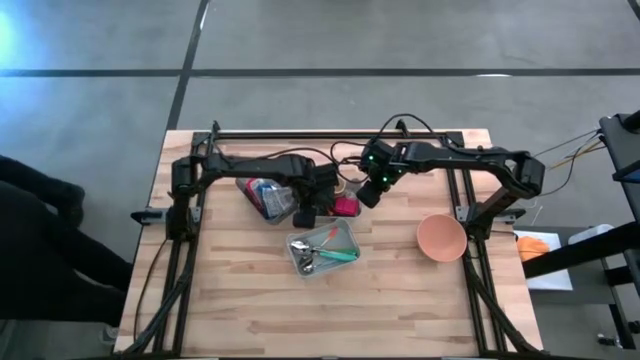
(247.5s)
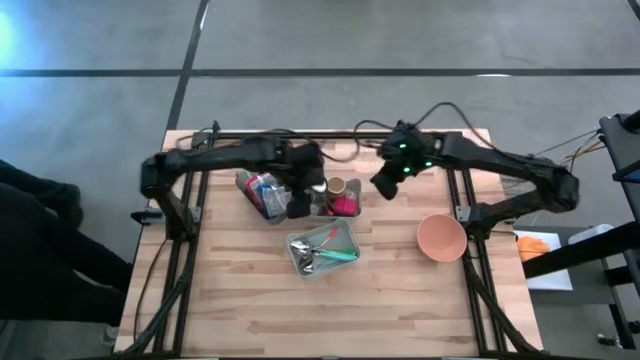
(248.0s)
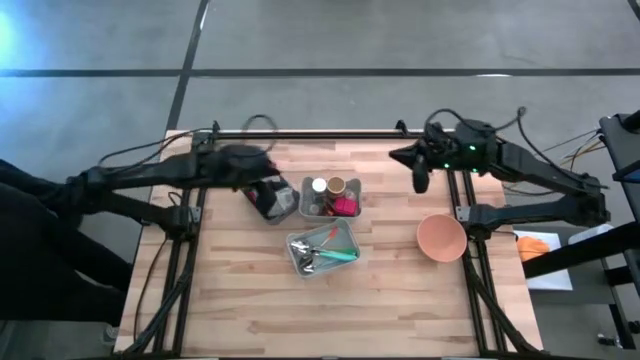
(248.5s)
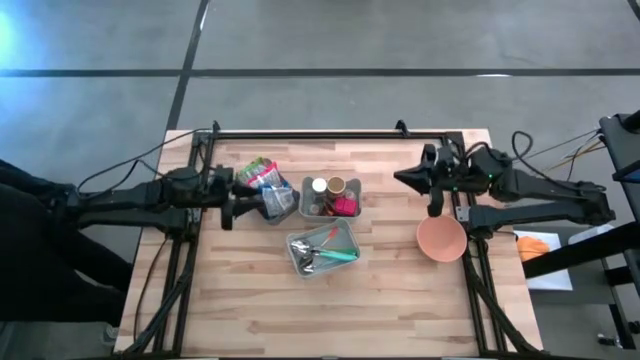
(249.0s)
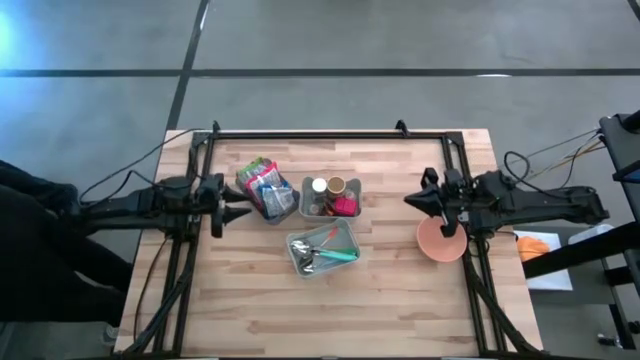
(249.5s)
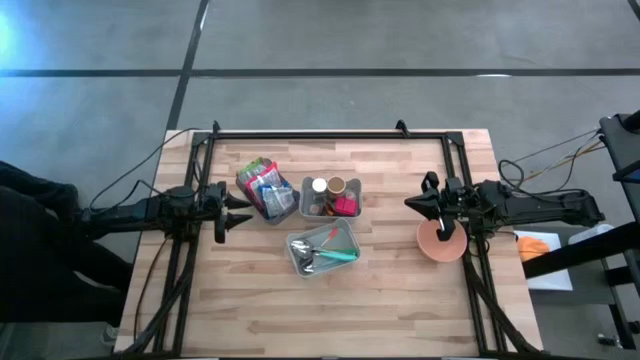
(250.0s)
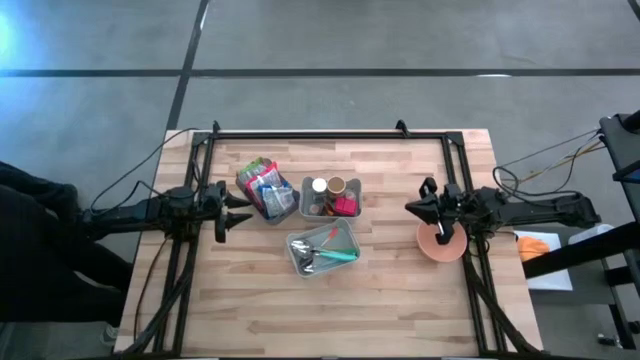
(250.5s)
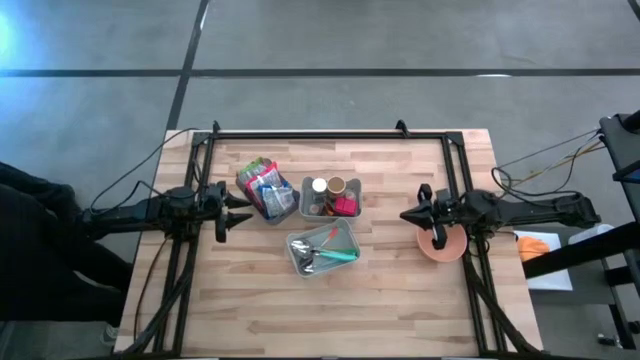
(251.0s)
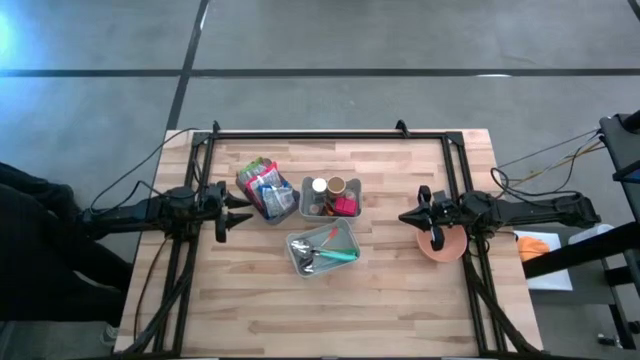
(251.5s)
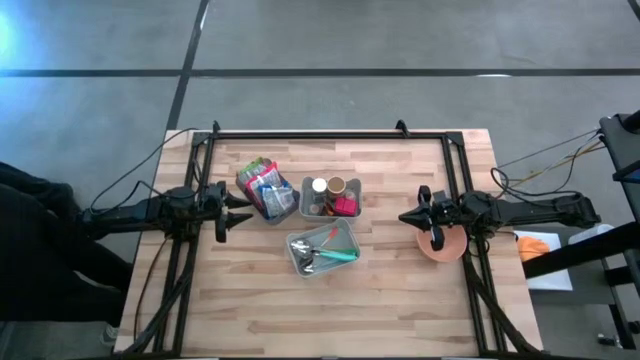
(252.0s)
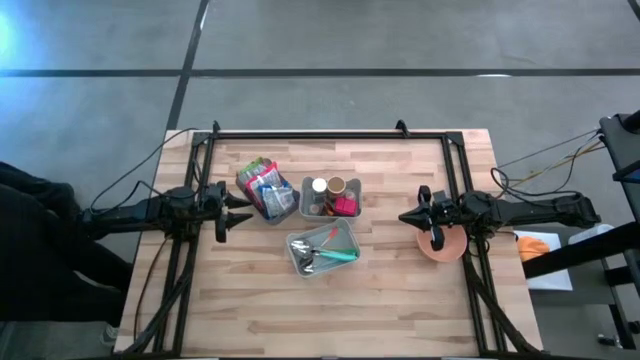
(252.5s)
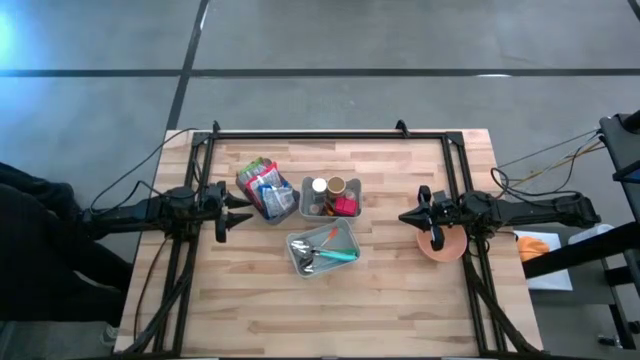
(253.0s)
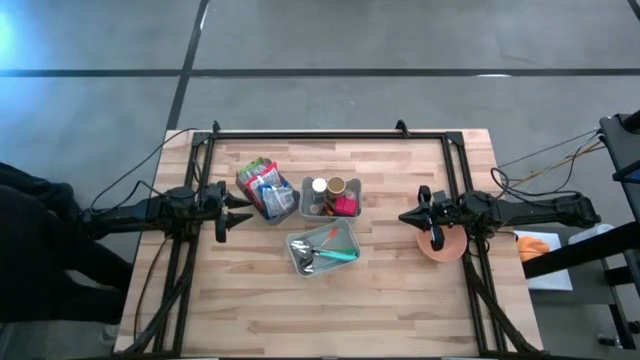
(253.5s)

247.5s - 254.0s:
Return to Home Position

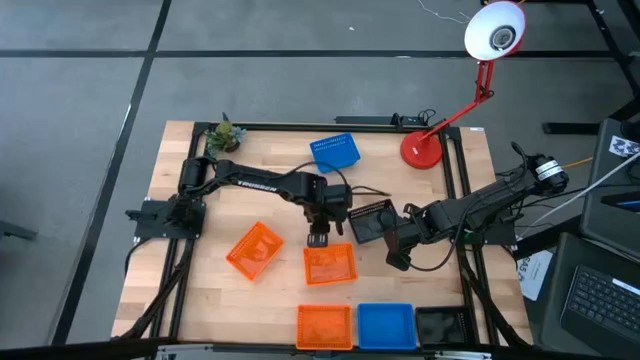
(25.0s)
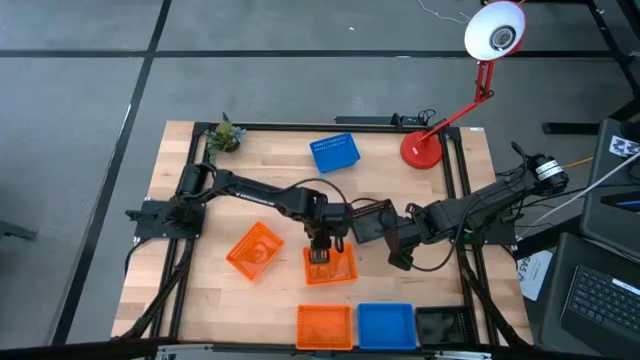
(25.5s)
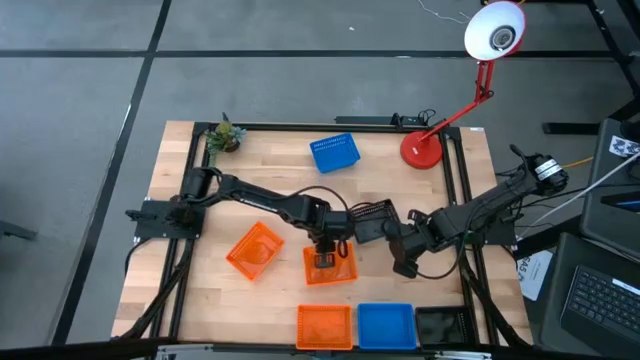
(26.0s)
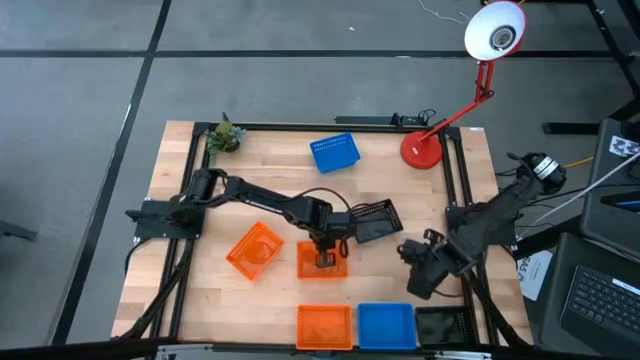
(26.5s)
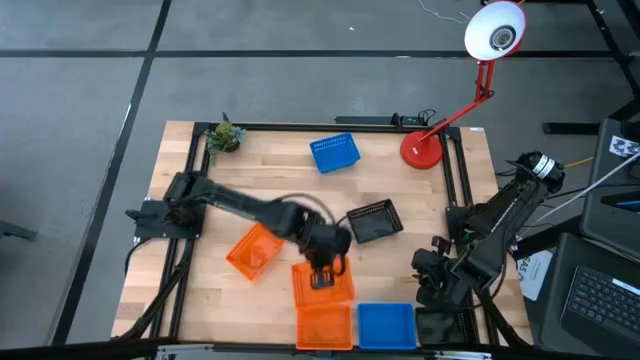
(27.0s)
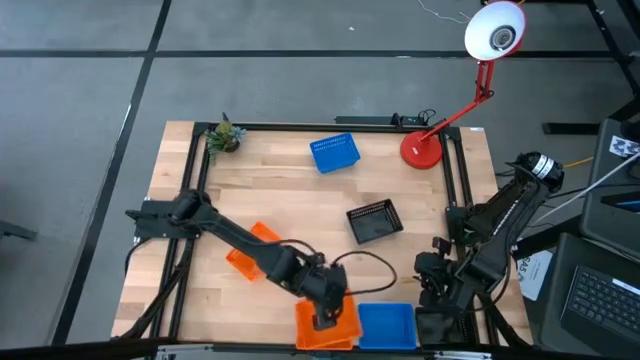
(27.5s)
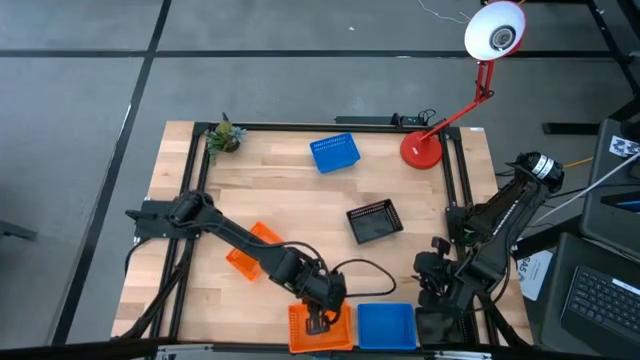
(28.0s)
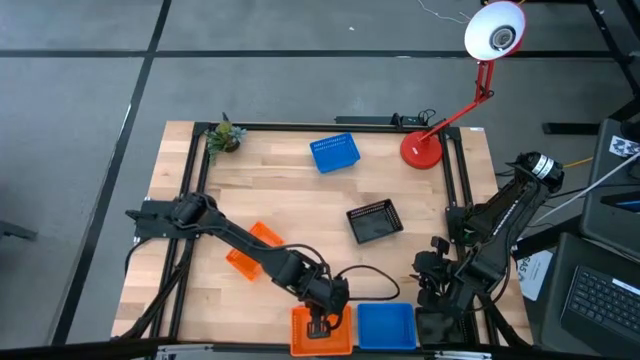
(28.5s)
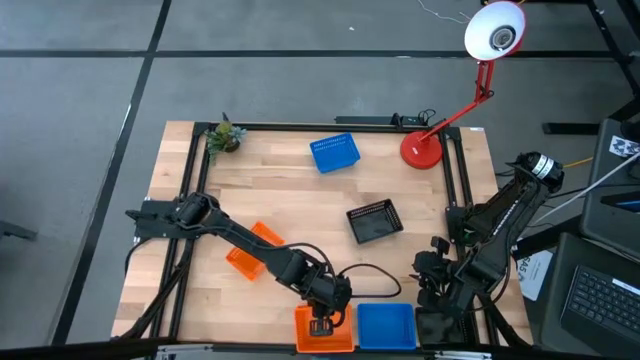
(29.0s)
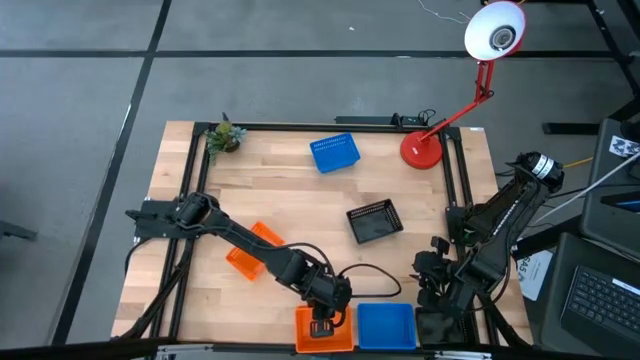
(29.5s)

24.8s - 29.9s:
Stack the top right orange bin on the bottom orange bin

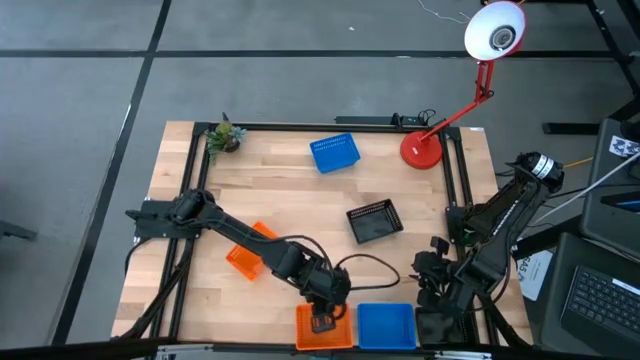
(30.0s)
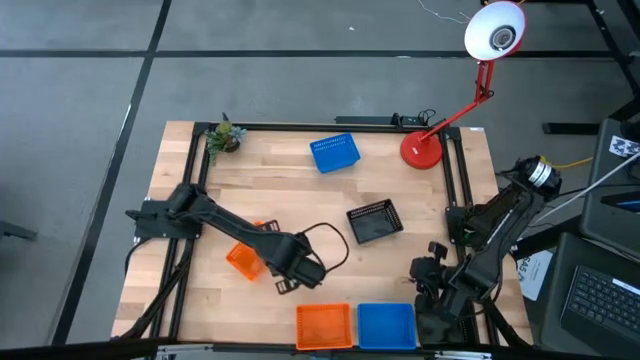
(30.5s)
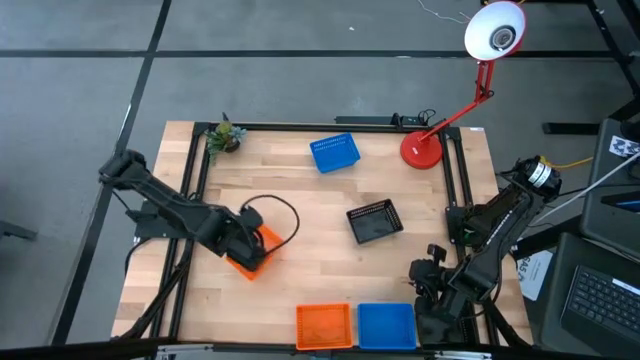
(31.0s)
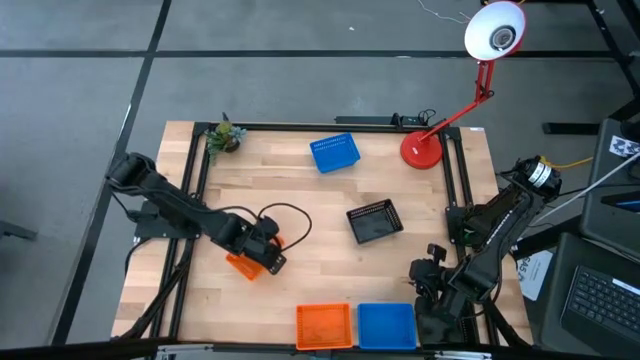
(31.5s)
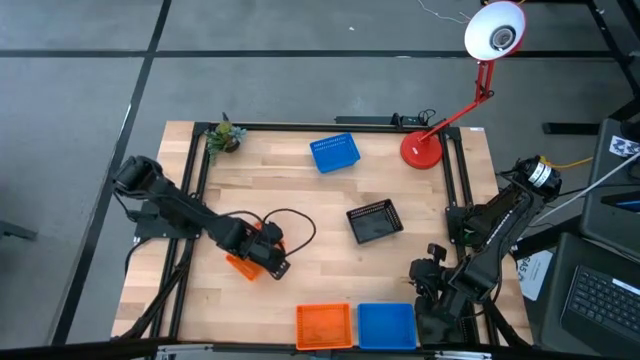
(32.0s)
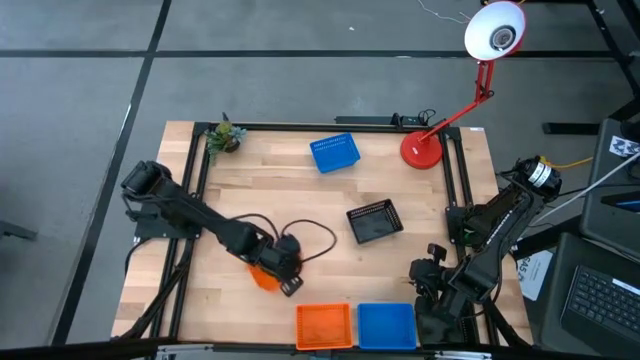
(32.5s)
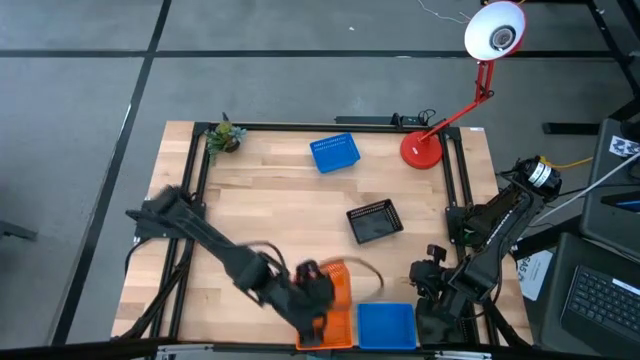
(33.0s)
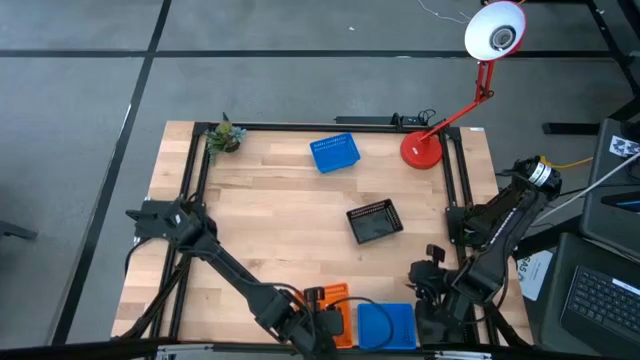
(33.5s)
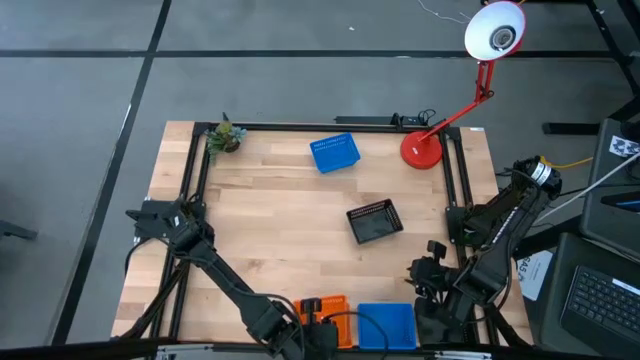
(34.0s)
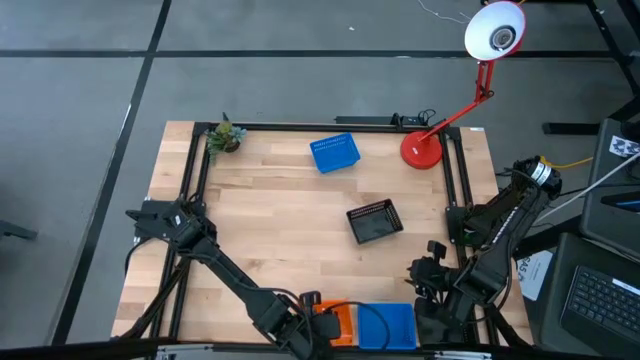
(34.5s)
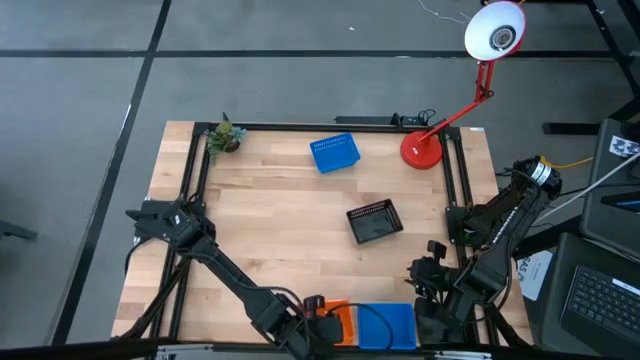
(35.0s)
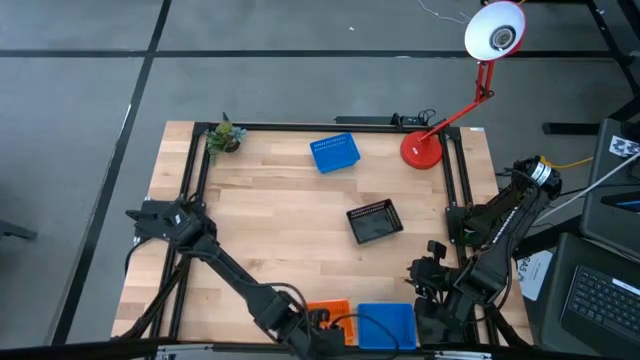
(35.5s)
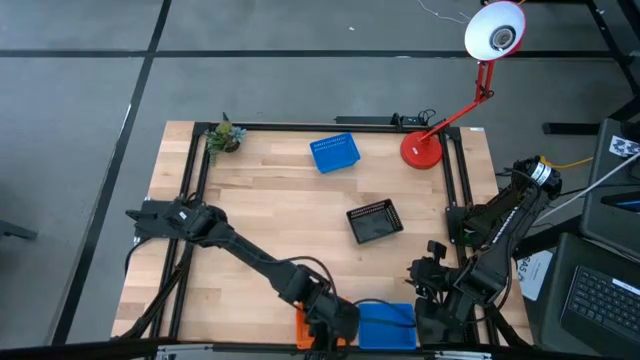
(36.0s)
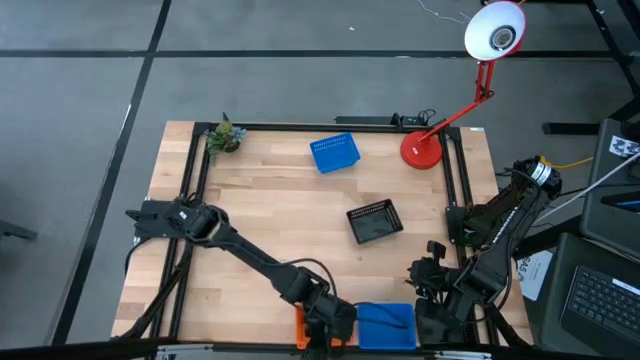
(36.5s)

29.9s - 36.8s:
Stack the top orange bin on the bottom orange bin
